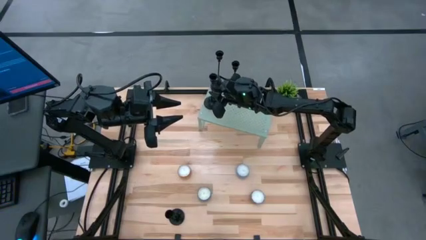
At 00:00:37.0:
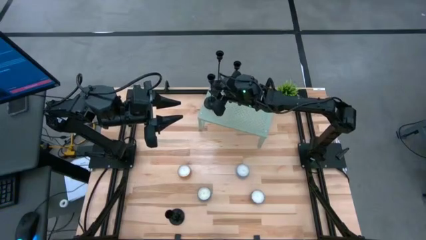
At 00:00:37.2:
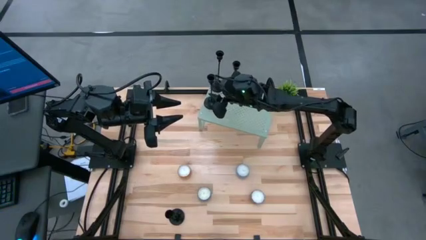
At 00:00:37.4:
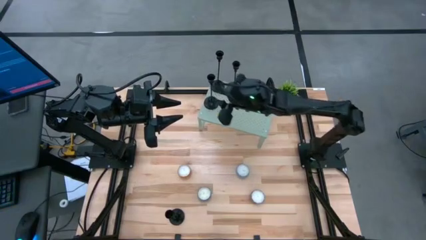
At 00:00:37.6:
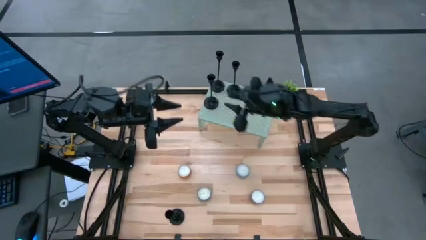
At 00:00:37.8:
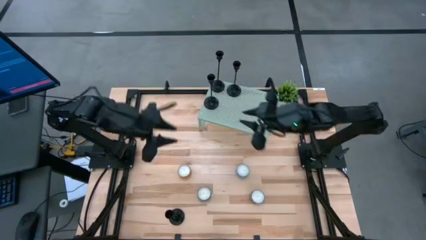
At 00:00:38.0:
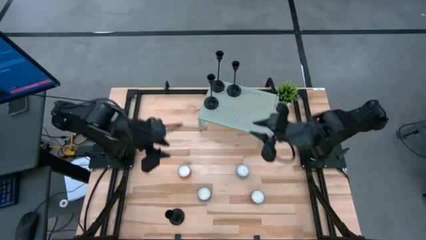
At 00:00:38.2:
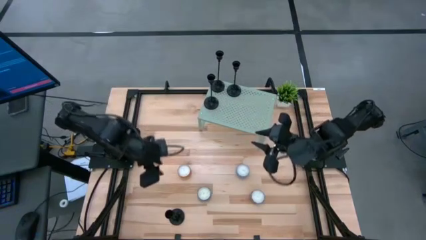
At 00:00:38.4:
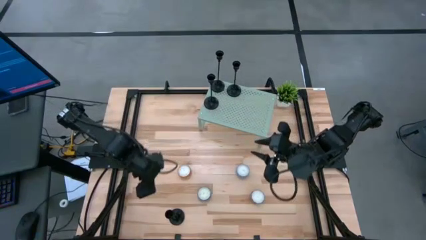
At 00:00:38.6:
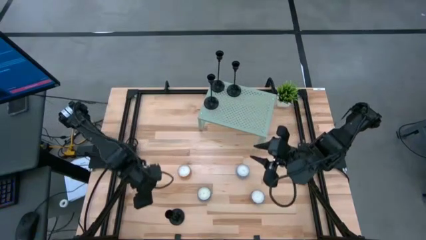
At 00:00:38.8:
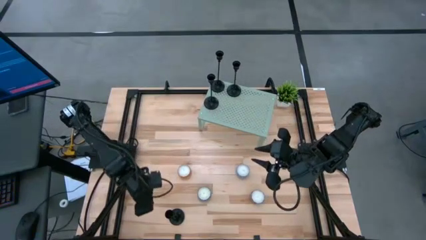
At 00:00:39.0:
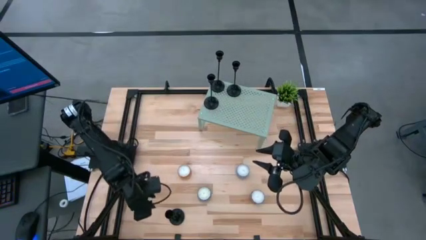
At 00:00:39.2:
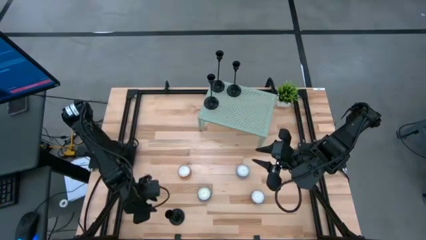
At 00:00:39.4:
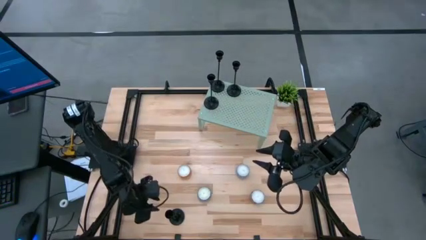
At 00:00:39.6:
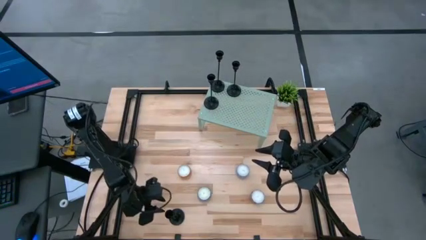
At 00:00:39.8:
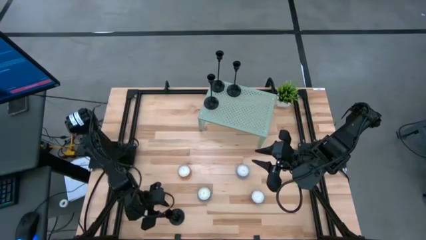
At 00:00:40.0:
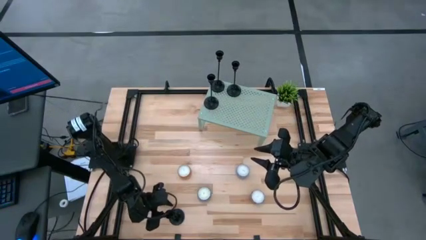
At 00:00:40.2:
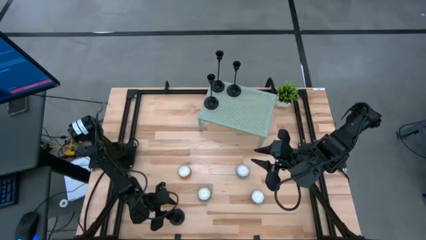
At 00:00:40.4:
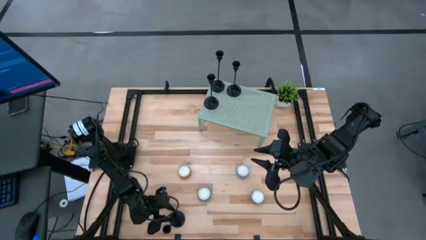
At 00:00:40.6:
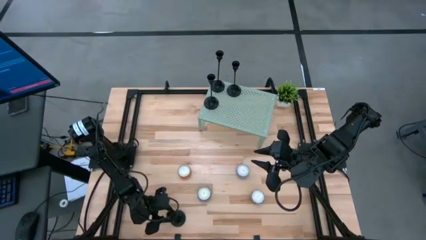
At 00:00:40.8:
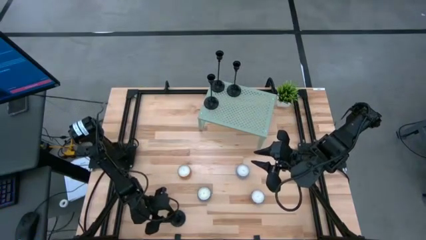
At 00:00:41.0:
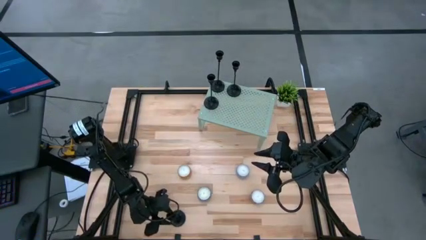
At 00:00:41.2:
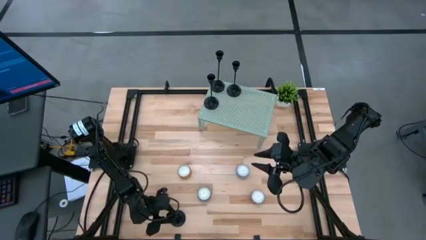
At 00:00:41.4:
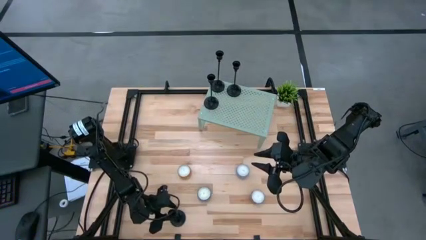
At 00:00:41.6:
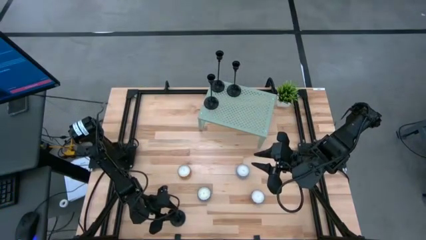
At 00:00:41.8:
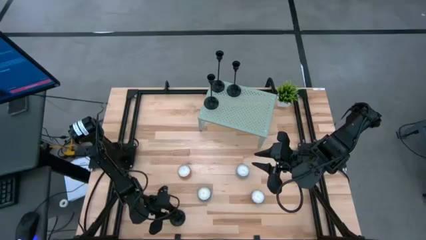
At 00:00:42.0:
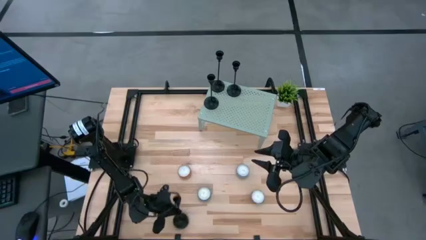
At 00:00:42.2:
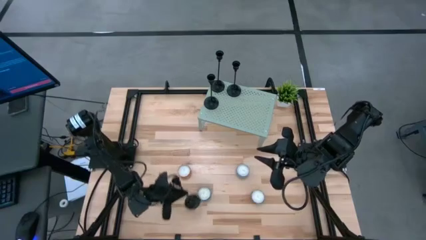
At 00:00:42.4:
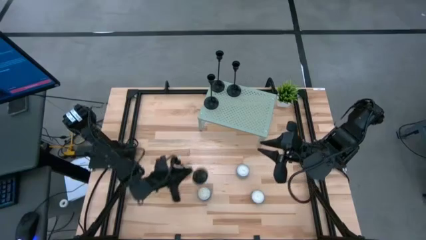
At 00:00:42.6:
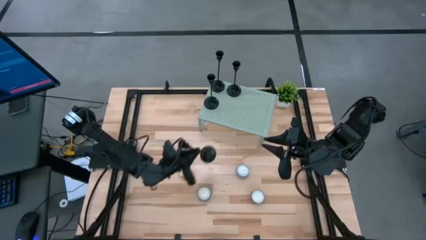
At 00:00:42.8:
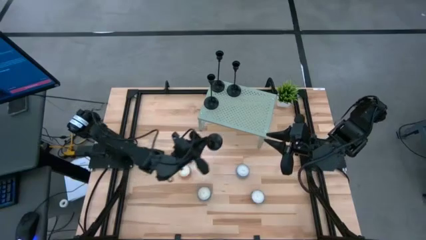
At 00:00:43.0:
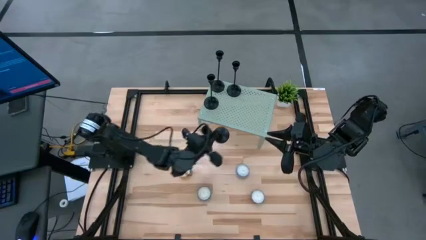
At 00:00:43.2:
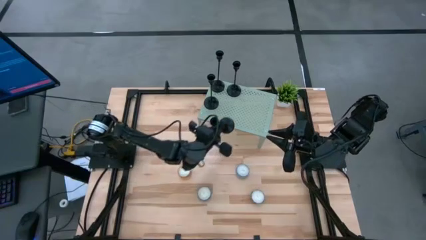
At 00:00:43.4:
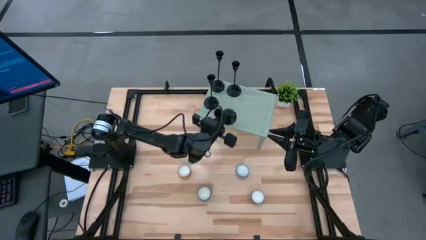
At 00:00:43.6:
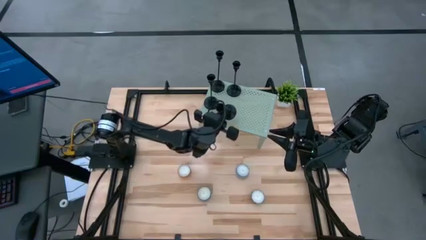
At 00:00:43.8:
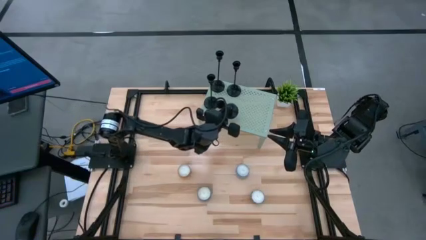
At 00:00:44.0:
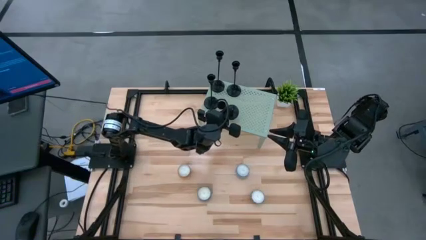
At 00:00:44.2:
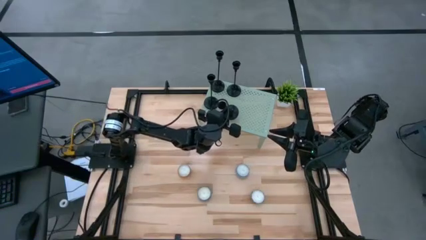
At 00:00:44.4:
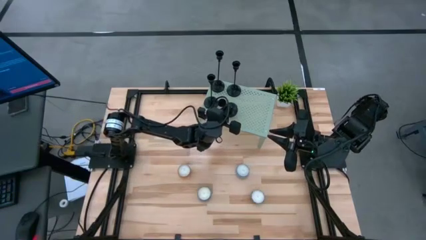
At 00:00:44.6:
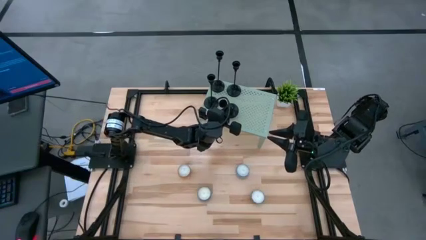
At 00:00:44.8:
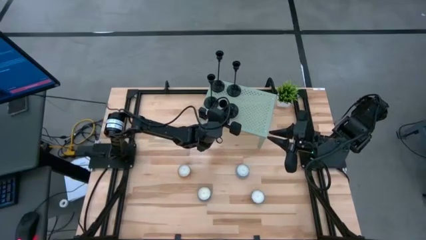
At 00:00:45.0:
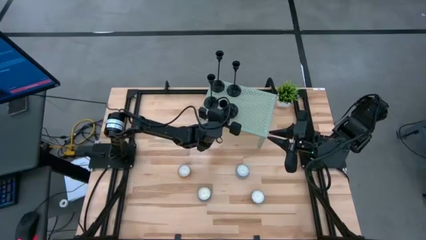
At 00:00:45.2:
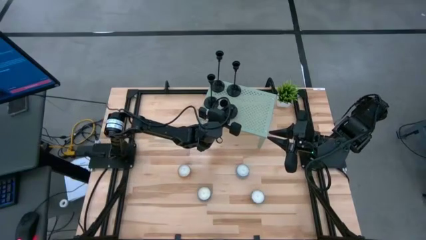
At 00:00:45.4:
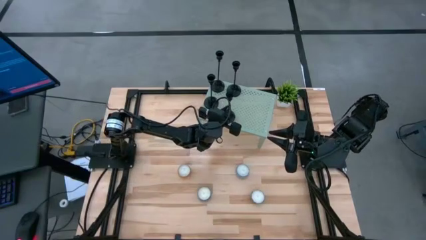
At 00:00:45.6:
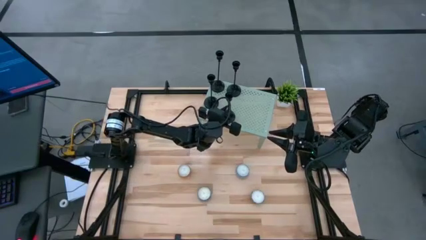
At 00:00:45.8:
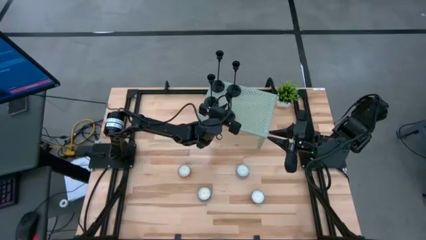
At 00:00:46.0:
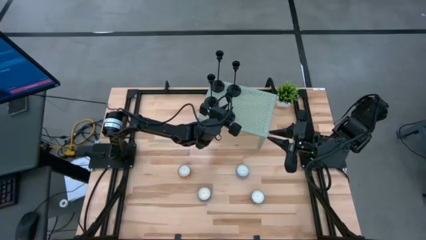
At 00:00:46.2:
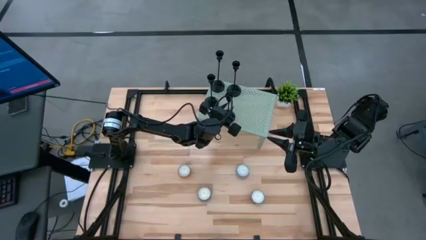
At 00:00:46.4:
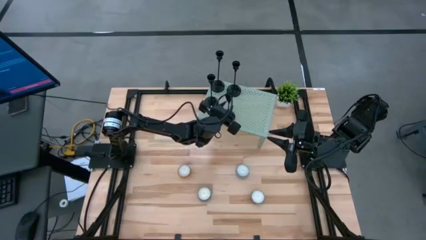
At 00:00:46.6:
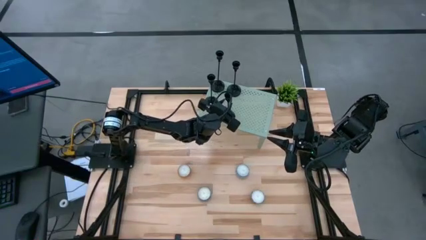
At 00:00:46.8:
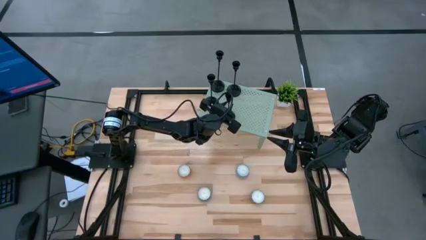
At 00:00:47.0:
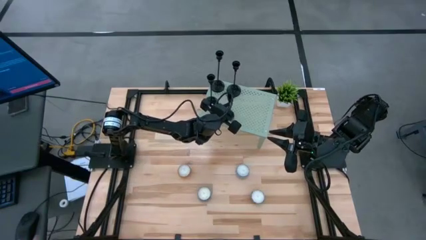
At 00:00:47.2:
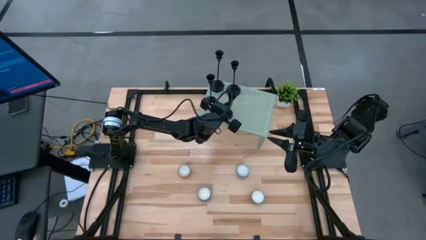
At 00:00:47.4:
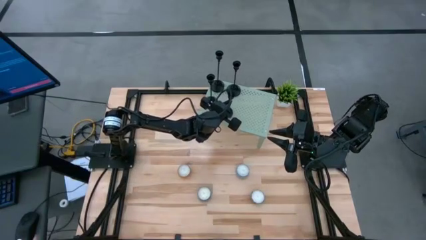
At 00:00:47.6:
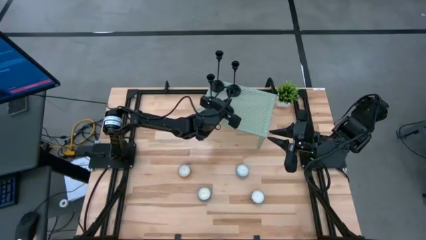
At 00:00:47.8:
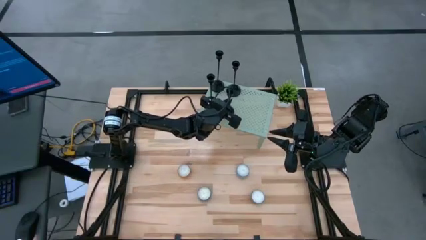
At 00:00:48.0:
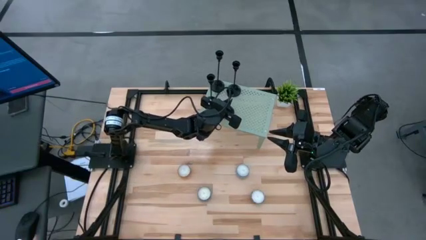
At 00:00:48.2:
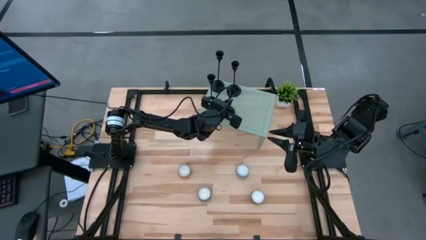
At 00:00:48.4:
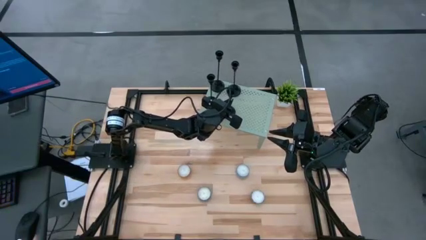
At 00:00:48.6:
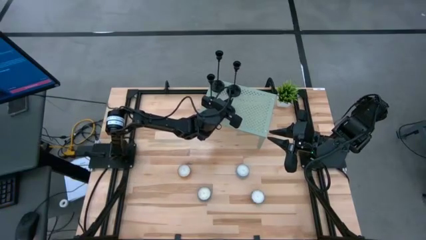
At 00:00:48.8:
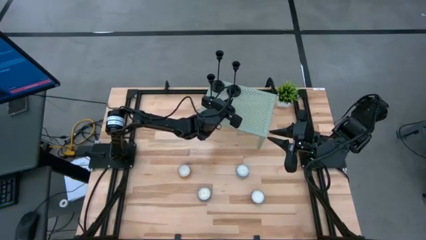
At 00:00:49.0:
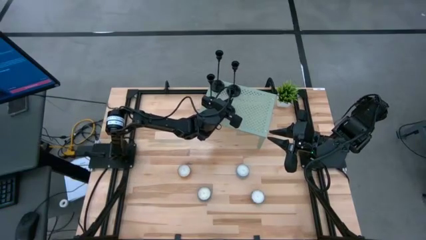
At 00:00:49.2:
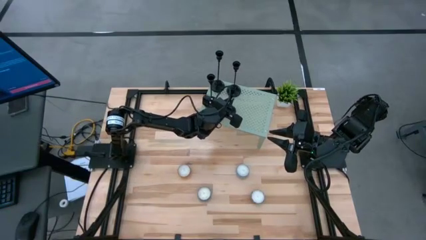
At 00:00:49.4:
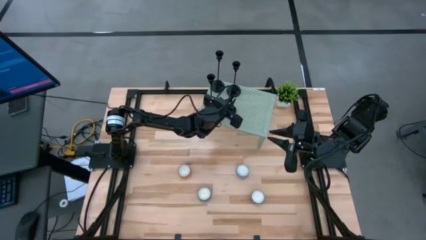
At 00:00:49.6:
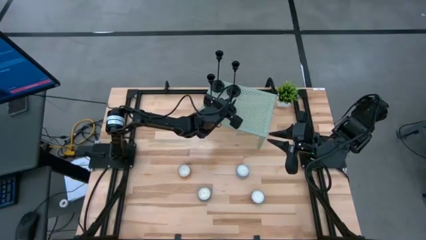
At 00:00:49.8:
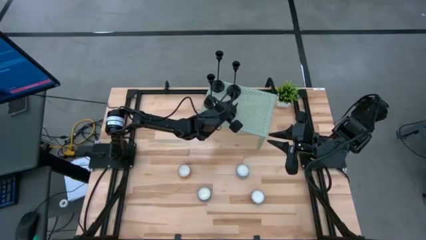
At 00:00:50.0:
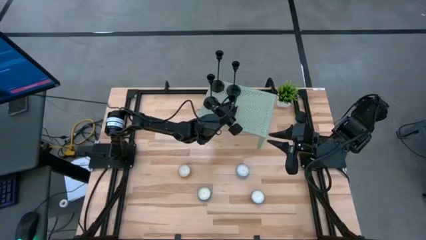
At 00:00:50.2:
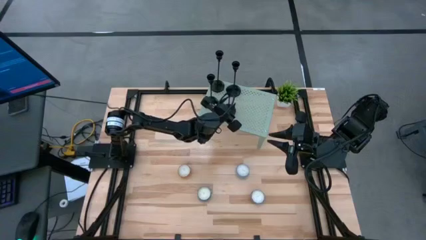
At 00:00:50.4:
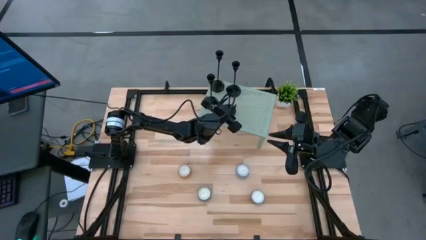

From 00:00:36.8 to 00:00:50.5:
Task: Pick & Place candle stick holders
Put the black candle holder on the shelf
